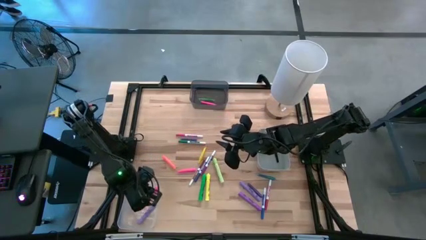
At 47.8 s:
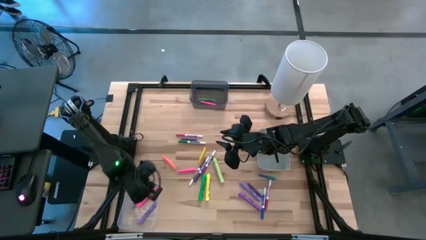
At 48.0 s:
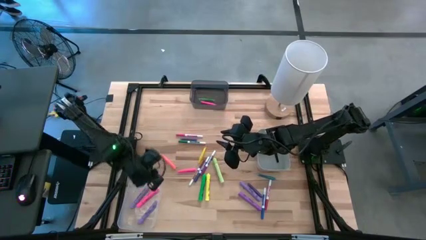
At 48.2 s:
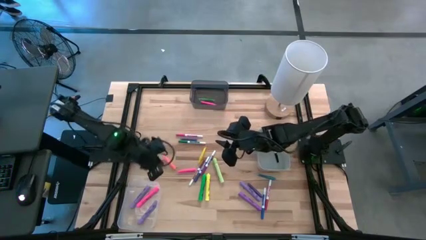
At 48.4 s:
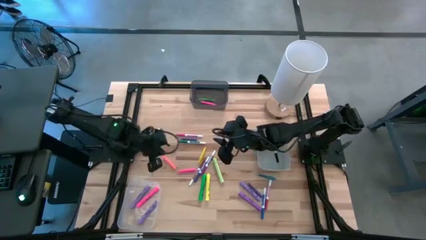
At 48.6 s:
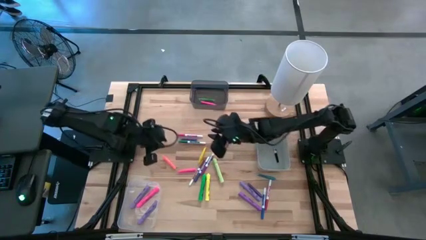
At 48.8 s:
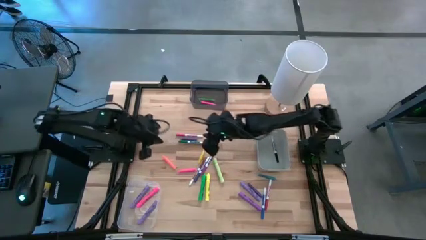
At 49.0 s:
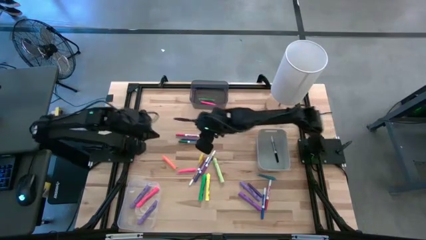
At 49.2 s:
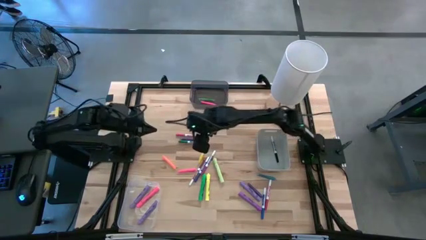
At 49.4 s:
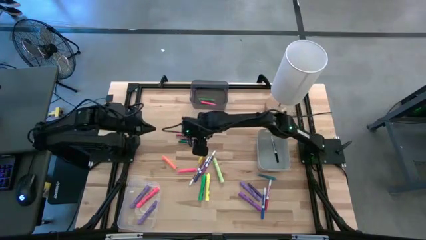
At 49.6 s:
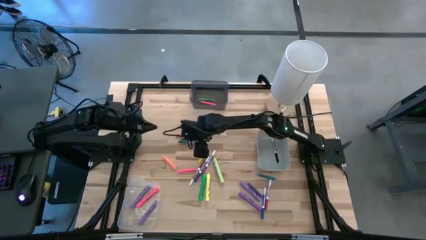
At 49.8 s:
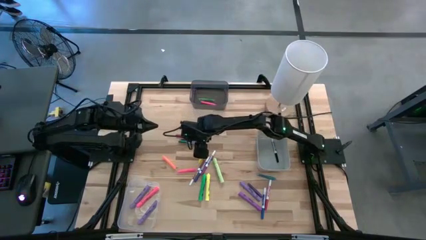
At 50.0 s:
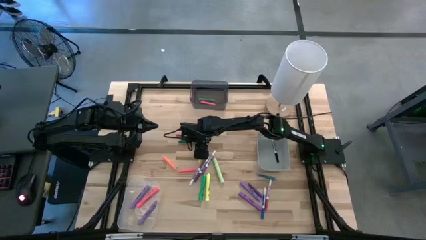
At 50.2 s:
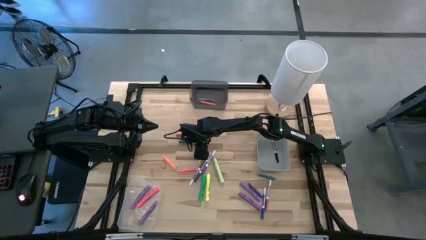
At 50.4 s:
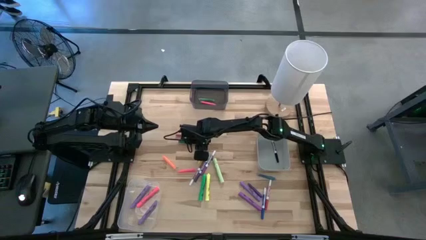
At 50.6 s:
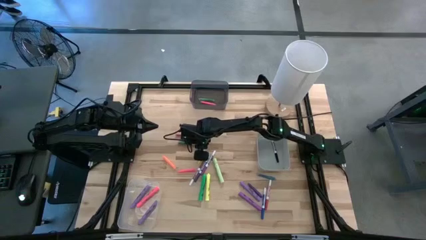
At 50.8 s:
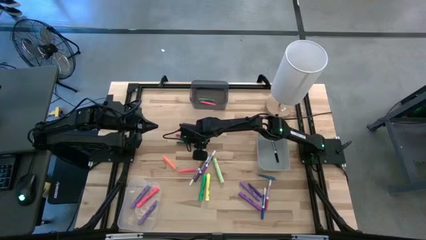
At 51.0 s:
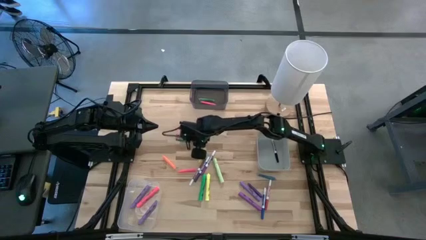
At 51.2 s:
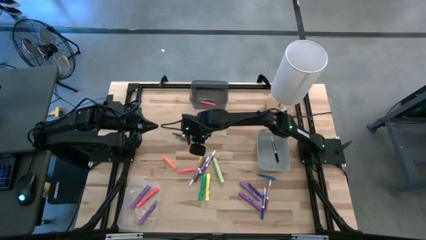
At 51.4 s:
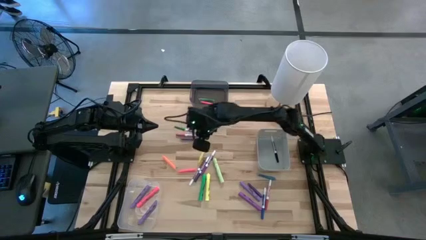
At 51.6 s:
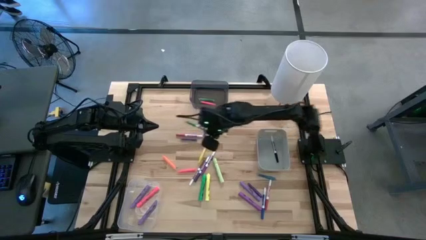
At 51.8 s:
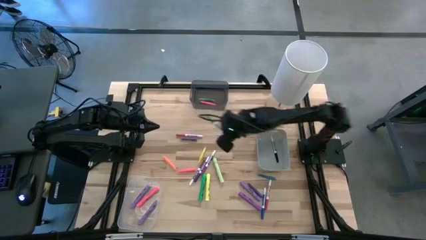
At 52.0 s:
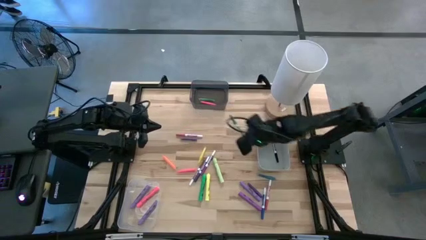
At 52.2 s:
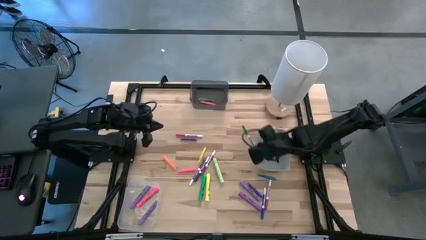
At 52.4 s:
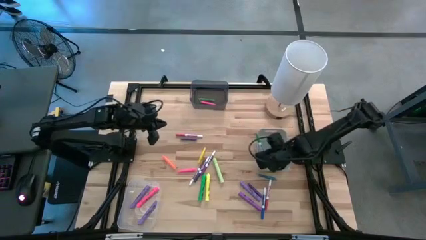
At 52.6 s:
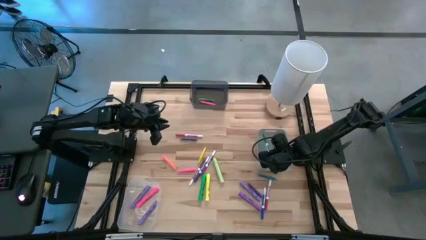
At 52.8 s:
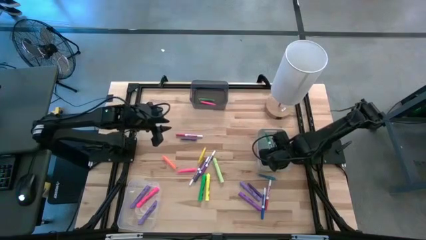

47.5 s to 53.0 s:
Task: Pick & Place Markers
Put the green marker pen into the gray bin

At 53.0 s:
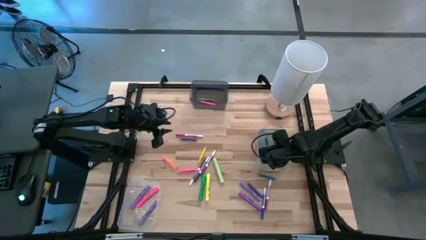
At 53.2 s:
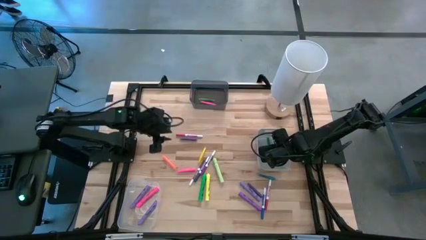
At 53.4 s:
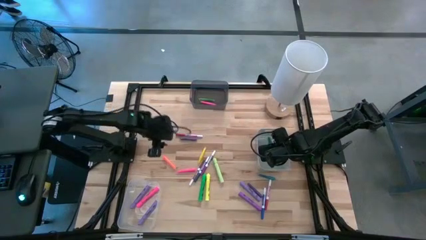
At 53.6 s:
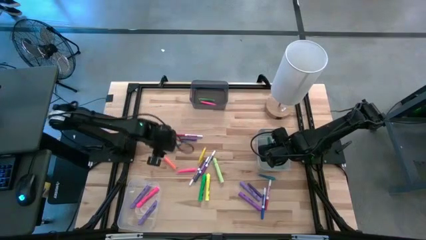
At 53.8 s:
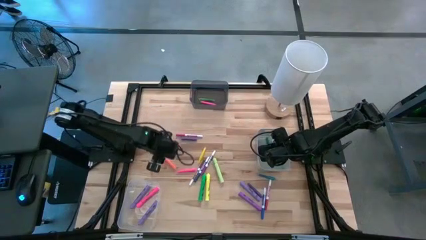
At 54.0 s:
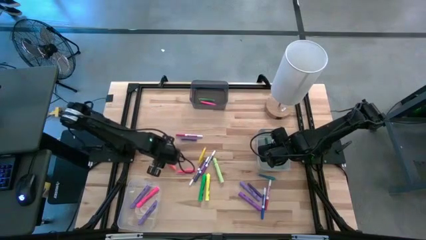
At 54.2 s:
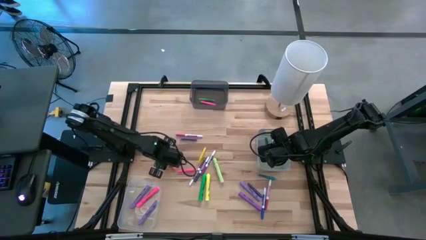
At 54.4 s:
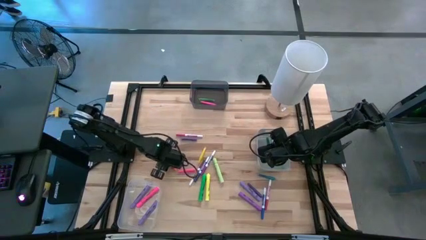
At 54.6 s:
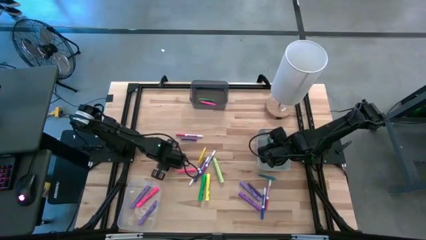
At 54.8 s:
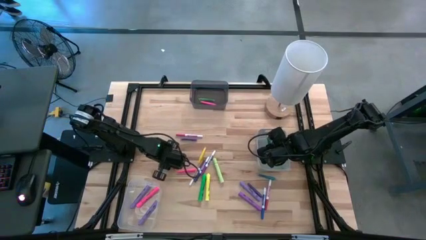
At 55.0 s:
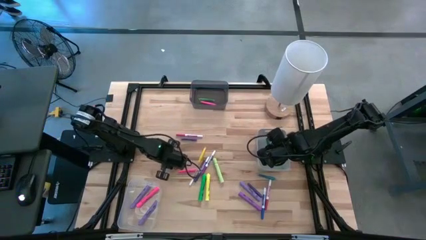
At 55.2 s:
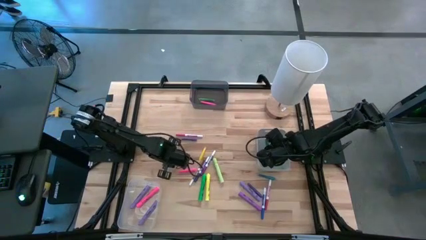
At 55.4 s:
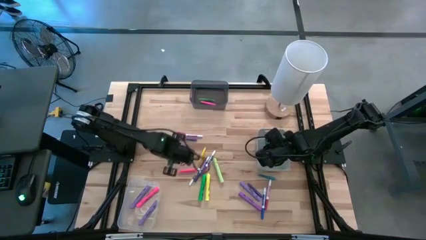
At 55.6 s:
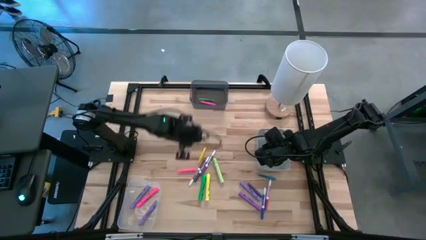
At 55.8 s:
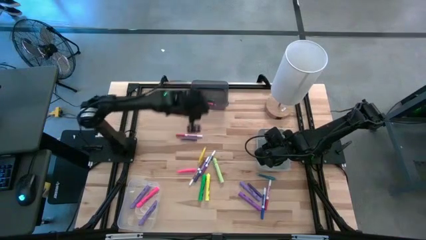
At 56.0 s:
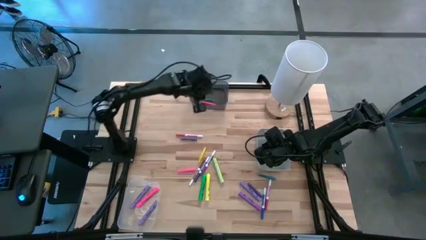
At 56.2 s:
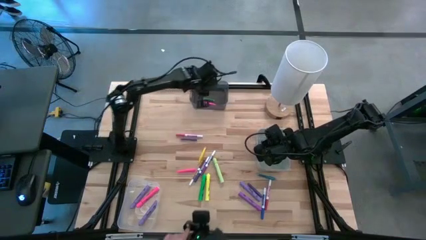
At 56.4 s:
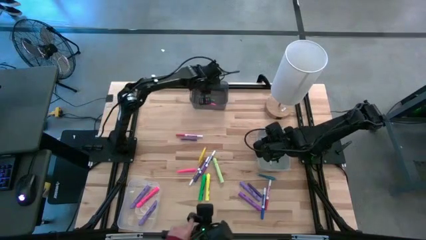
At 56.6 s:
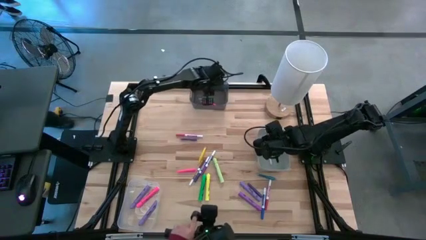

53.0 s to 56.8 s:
Put the orange pen into the black bin

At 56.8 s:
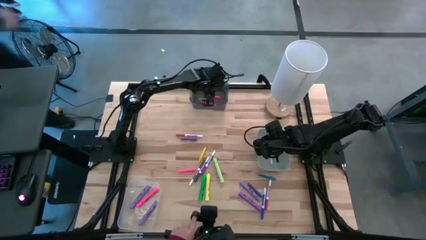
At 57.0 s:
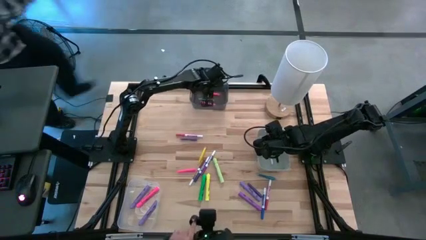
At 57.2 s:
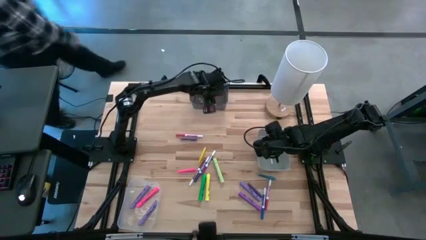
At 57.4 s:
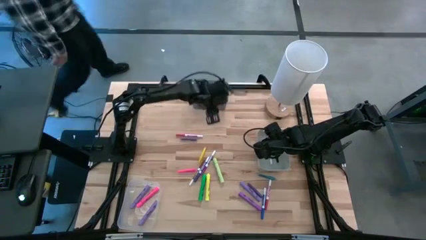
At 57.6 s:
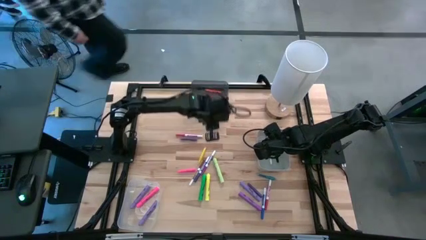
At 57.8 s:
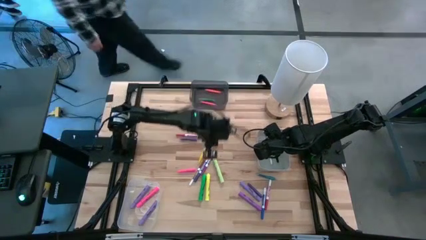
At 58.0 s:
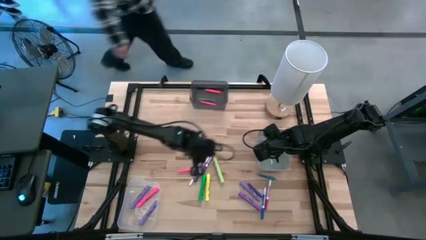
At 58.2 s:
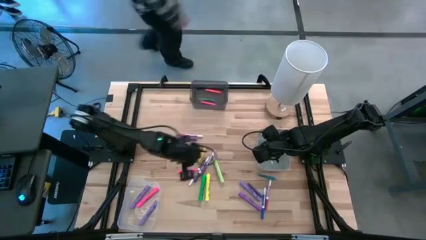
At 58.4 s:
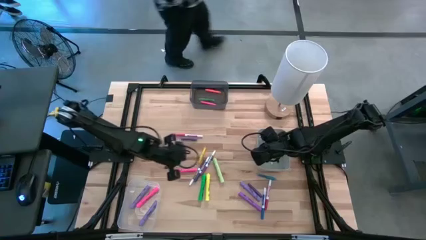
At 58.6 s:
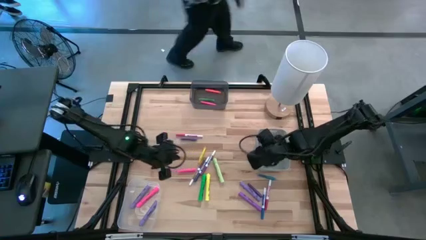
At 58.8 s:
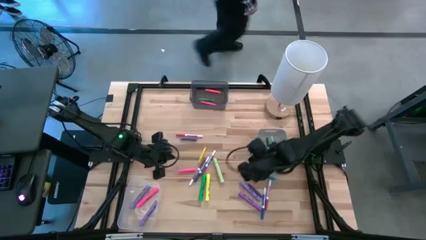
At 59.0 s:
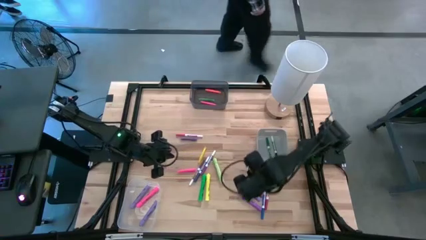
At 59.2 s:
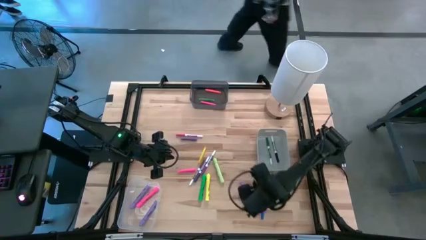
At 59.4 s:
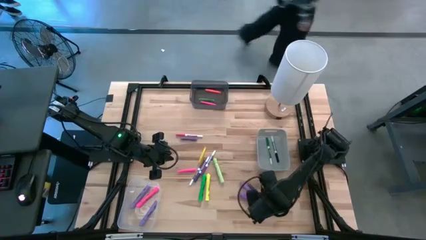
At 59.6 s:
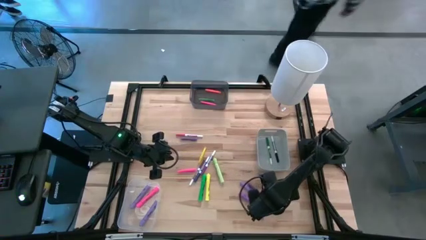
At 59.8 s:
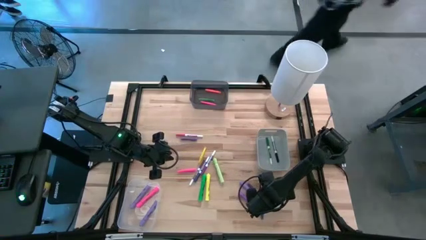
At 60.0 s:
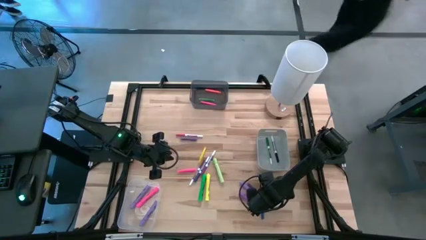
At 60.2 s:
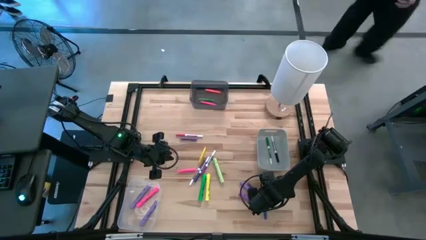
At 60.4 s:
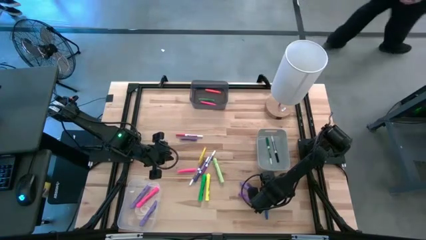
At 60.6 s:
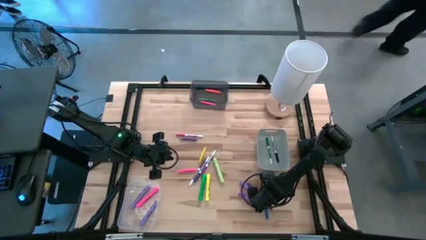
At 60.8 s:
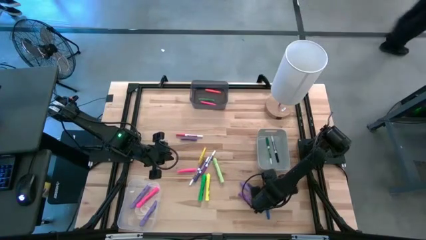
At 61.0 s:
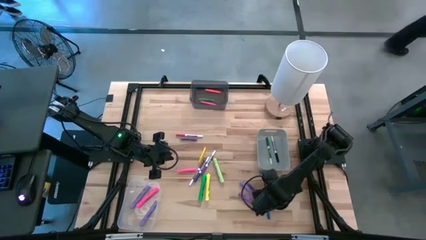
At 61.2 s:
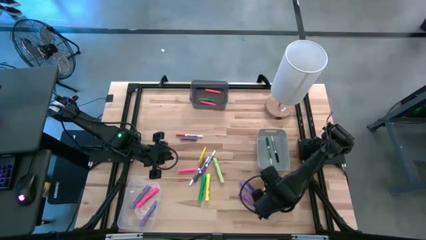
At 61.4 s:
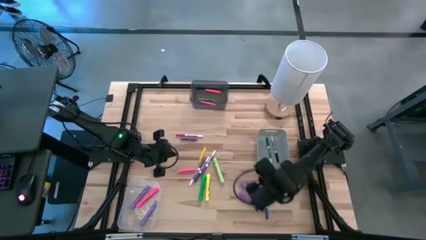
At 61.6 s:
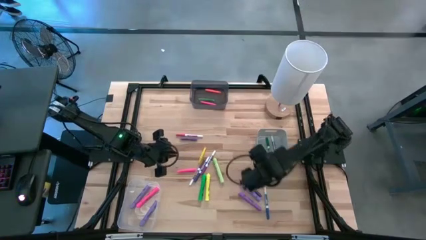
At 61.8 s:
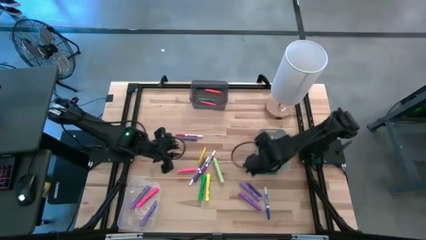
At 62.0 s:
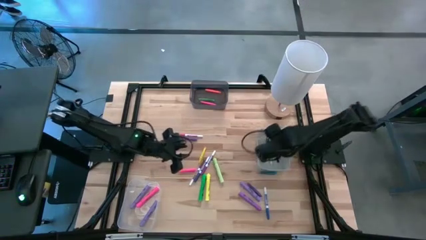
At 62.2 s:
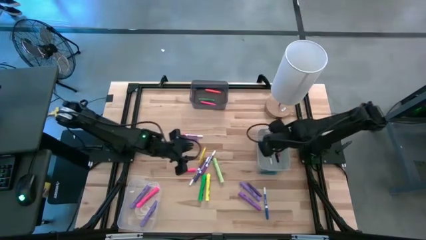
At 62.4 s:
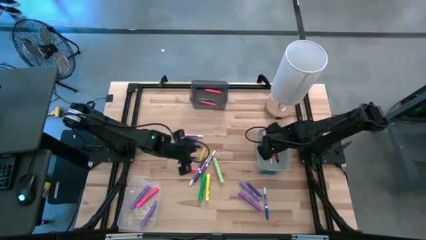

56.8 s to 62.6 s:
Put the red marker pen into the gray bin

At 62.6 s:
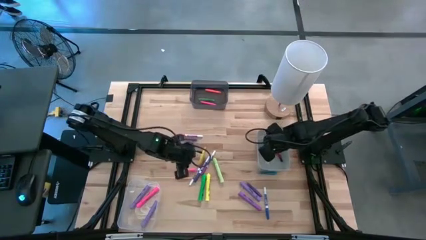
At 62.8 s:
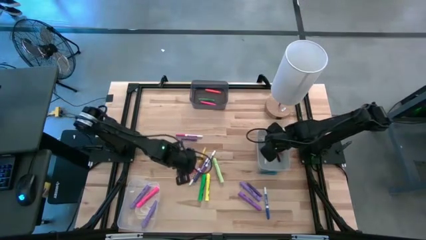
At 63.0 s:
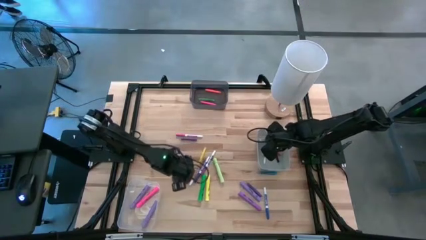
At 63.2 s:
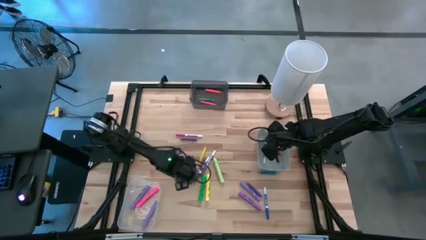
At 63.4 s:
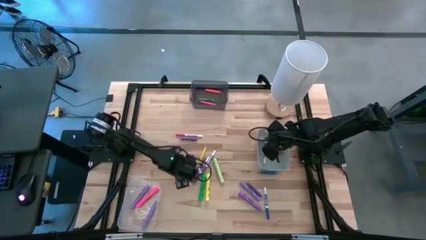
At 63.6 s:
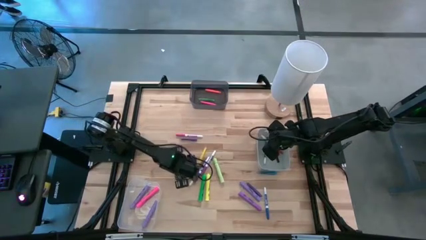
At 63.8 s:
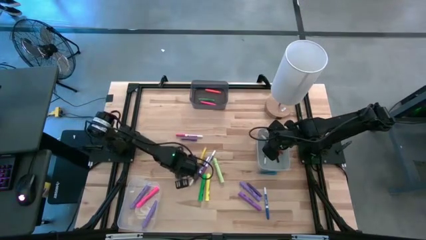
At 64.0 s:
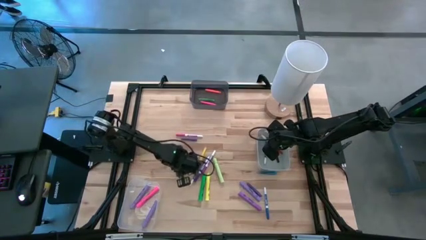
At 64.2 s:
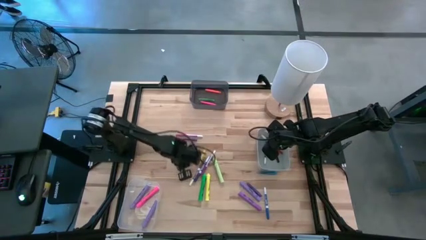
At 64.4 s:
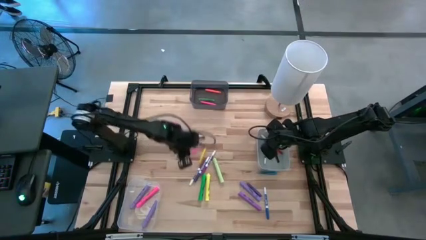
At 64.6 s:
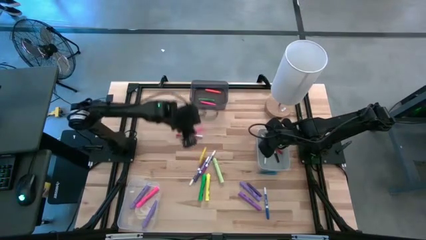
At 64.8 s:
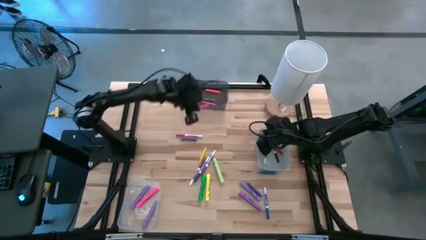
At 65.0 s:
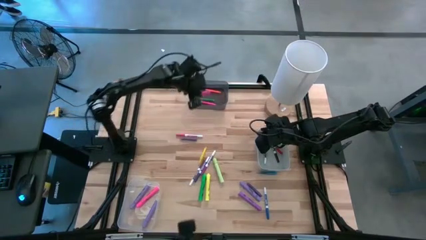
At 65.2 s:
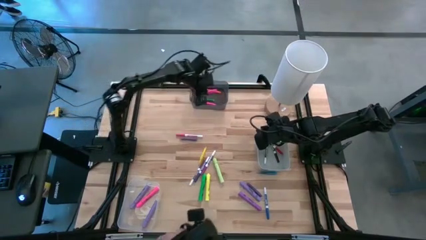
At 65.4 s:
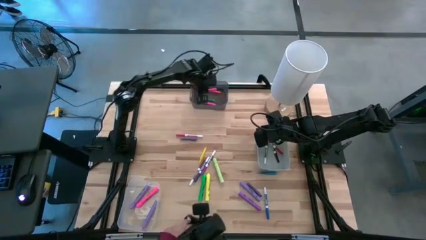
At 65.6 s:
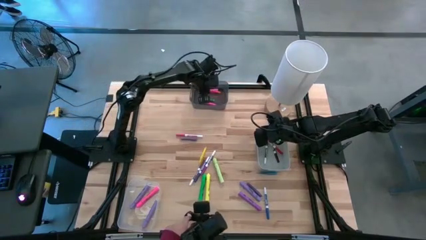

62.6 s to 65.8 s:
Put the pink pen into the black bin
